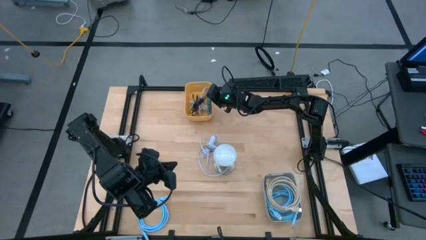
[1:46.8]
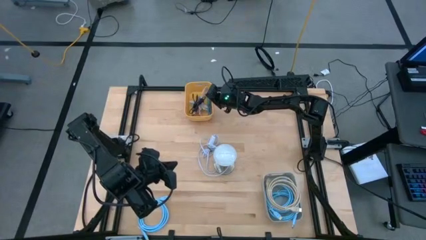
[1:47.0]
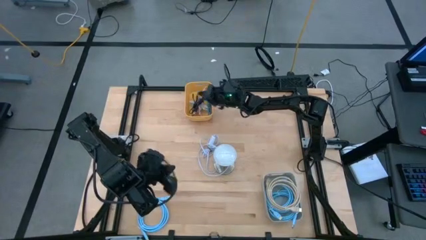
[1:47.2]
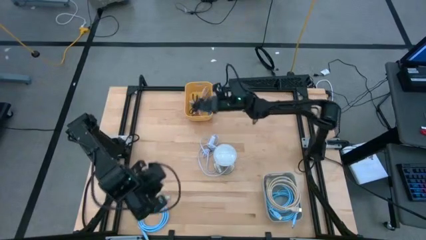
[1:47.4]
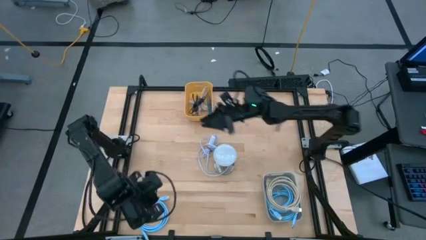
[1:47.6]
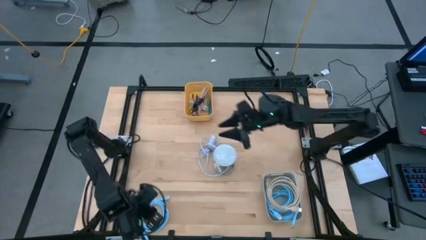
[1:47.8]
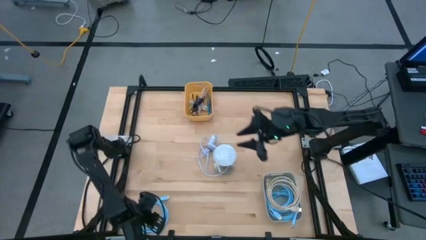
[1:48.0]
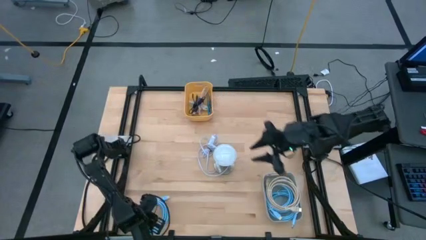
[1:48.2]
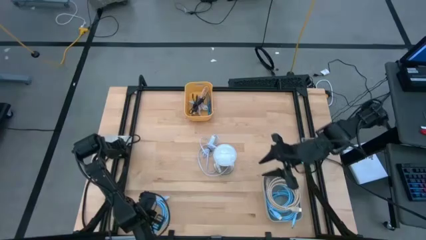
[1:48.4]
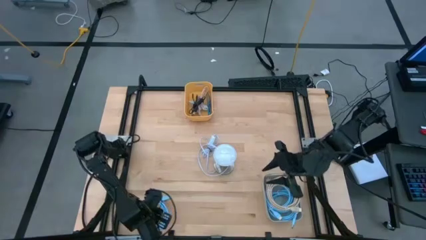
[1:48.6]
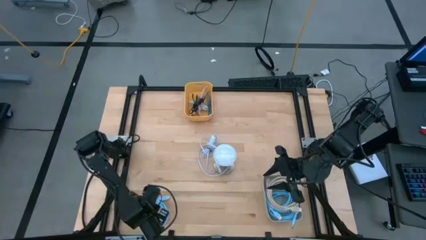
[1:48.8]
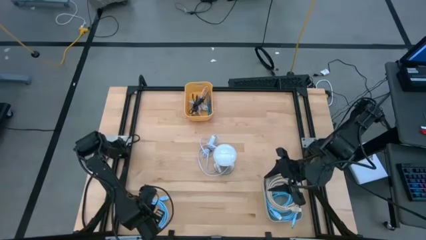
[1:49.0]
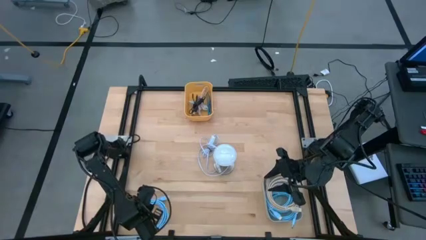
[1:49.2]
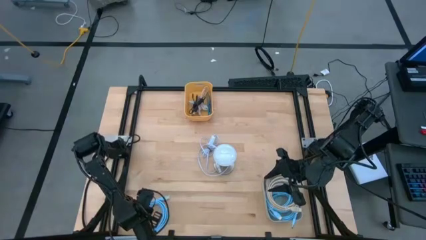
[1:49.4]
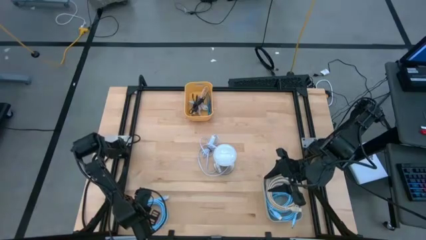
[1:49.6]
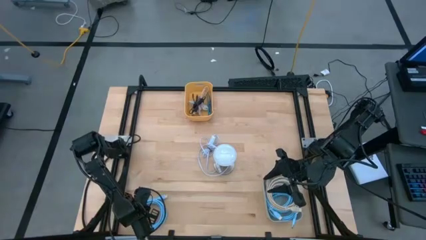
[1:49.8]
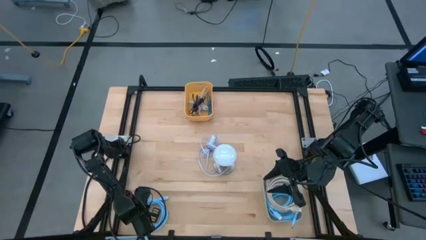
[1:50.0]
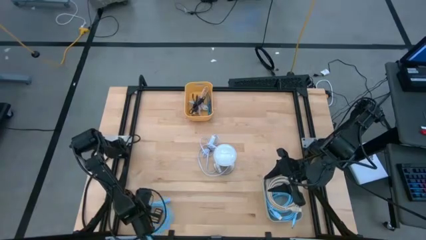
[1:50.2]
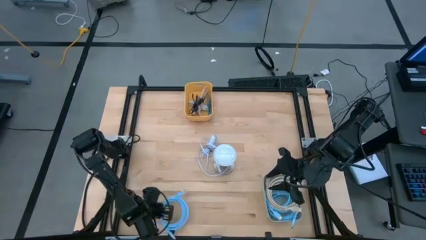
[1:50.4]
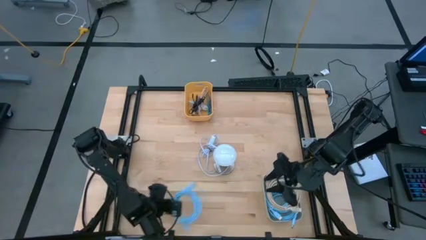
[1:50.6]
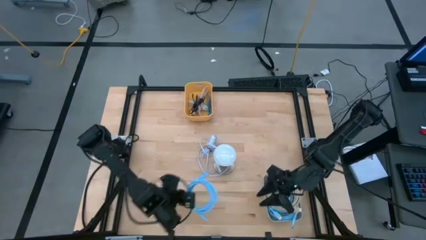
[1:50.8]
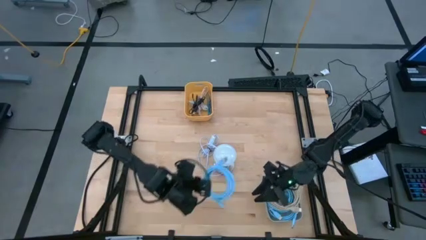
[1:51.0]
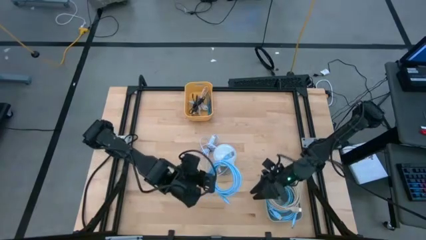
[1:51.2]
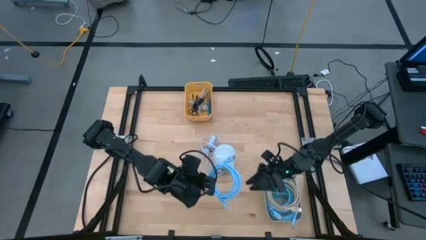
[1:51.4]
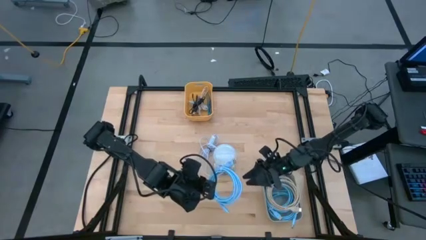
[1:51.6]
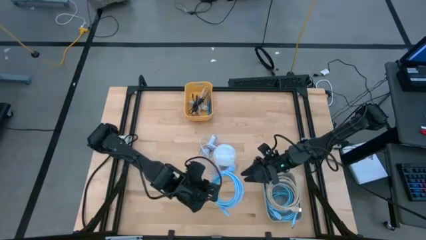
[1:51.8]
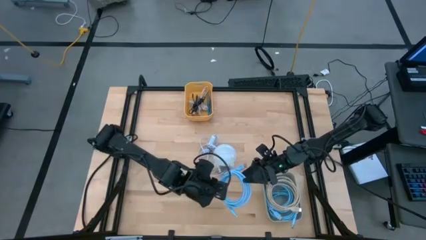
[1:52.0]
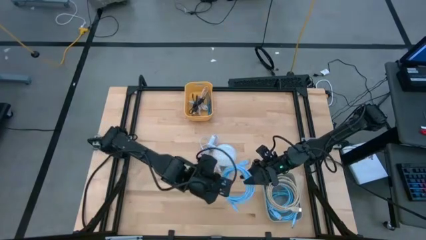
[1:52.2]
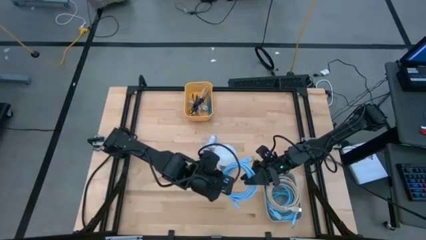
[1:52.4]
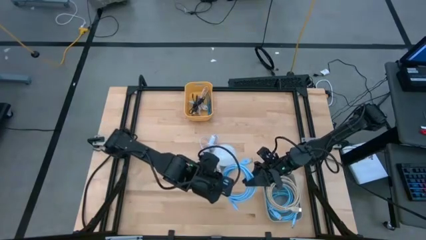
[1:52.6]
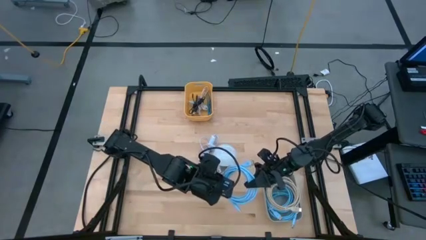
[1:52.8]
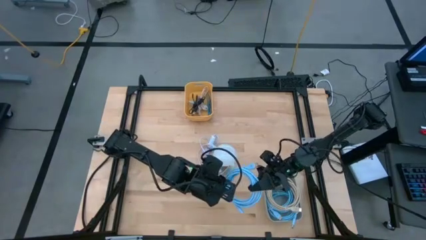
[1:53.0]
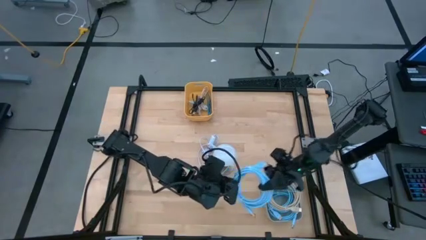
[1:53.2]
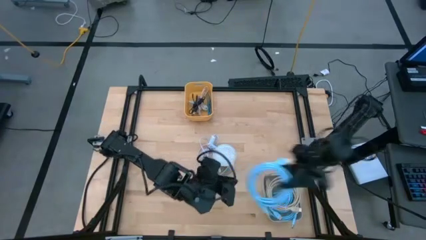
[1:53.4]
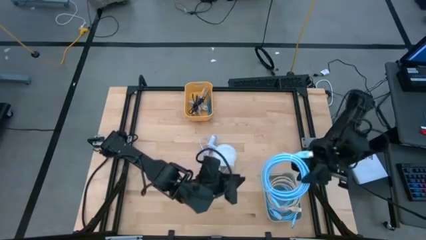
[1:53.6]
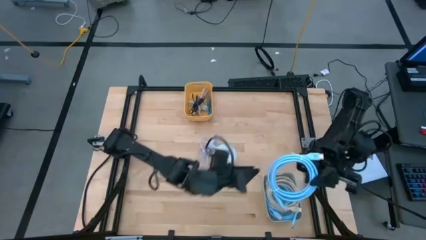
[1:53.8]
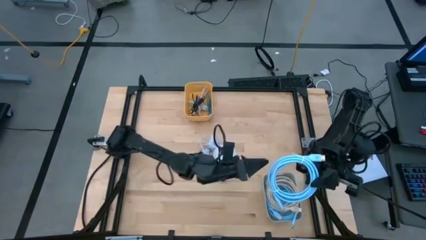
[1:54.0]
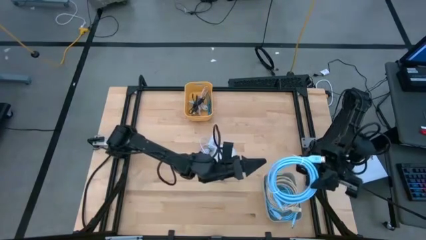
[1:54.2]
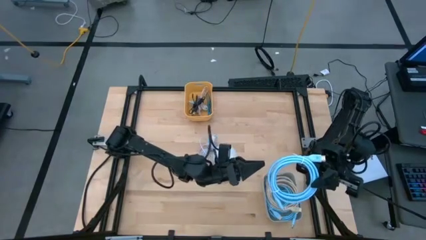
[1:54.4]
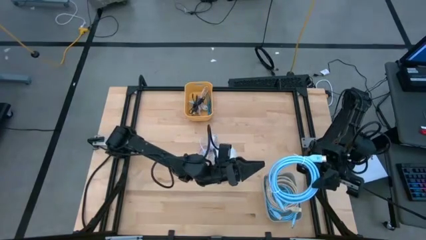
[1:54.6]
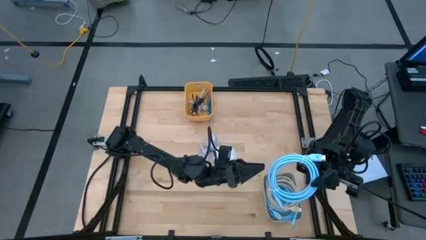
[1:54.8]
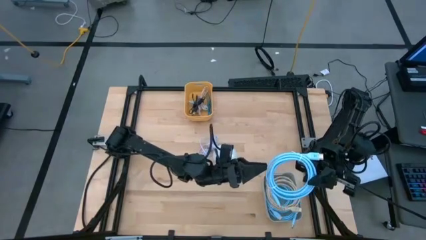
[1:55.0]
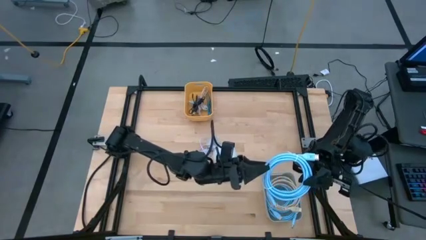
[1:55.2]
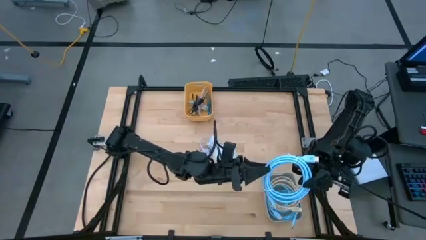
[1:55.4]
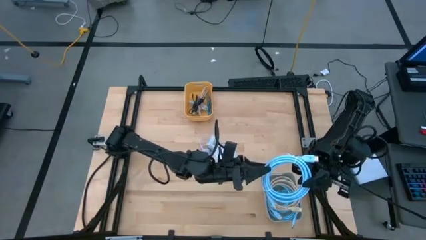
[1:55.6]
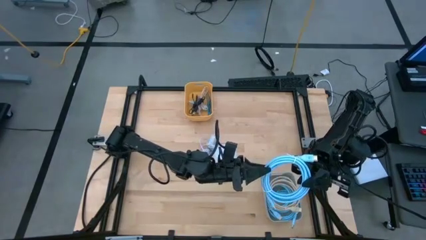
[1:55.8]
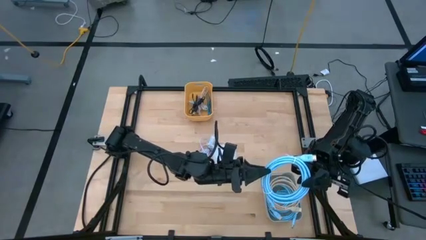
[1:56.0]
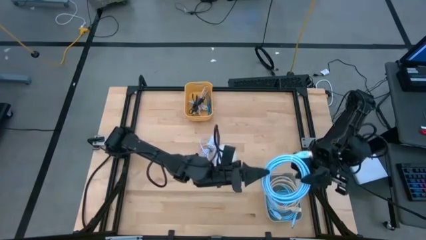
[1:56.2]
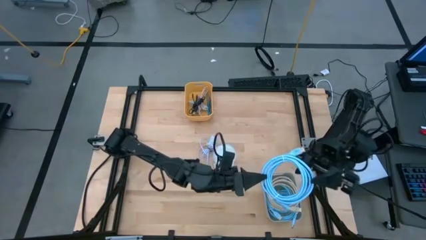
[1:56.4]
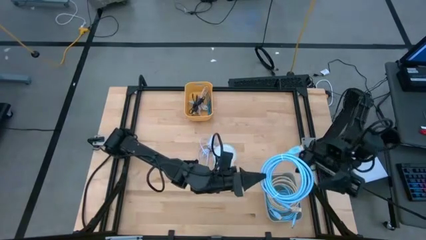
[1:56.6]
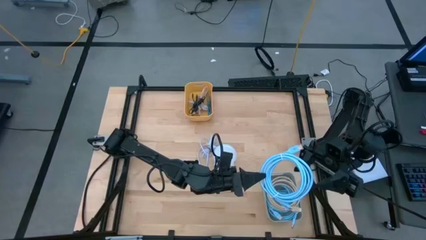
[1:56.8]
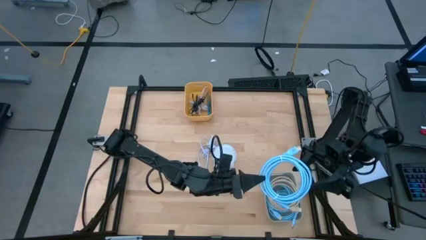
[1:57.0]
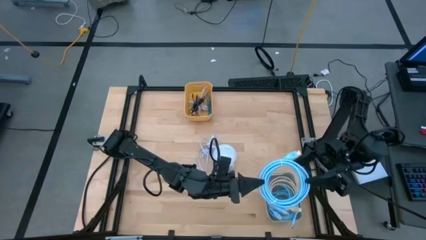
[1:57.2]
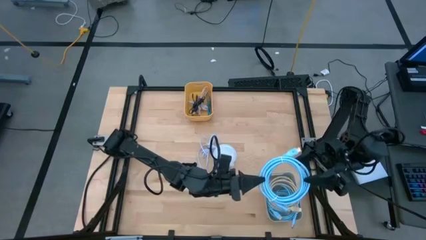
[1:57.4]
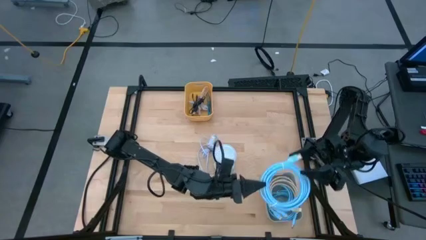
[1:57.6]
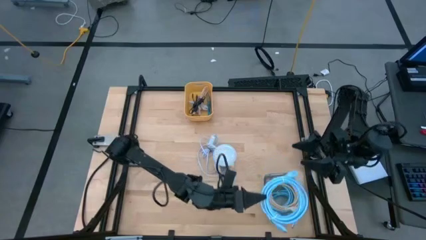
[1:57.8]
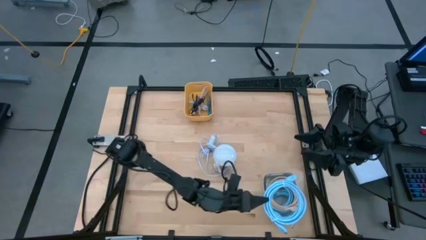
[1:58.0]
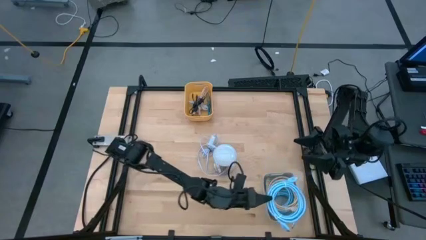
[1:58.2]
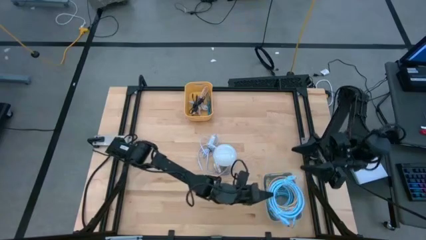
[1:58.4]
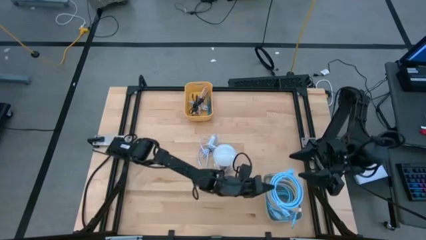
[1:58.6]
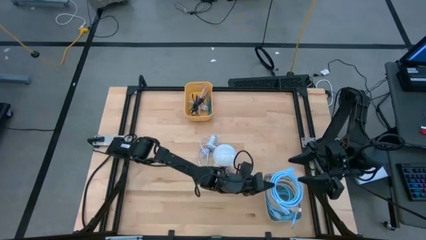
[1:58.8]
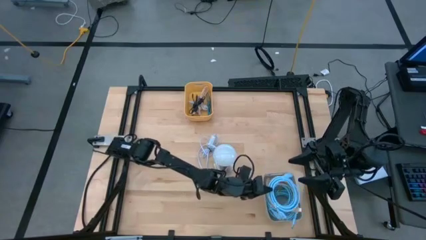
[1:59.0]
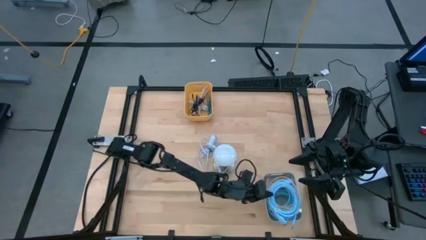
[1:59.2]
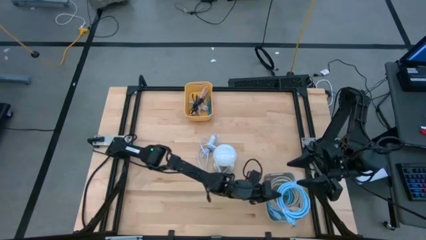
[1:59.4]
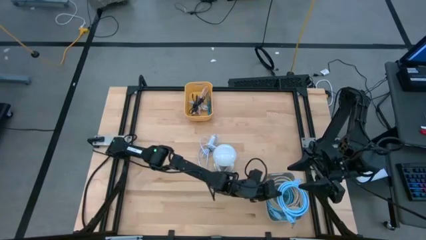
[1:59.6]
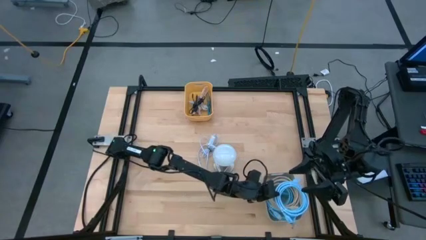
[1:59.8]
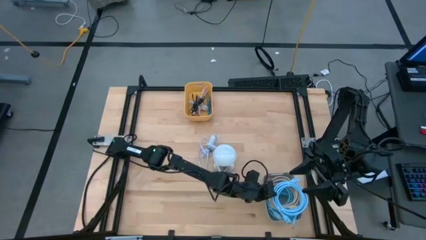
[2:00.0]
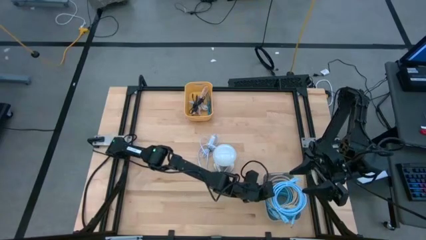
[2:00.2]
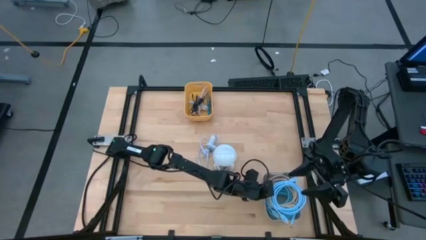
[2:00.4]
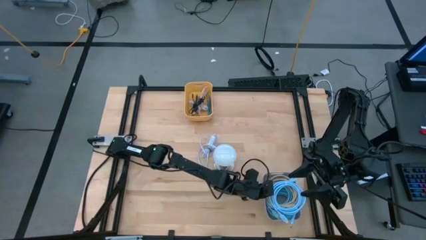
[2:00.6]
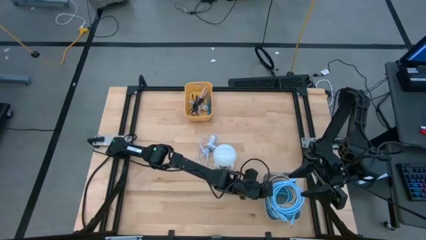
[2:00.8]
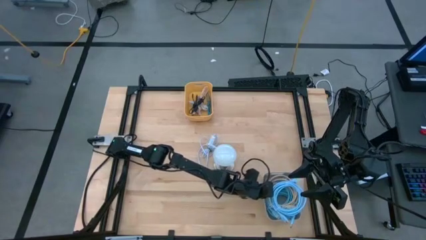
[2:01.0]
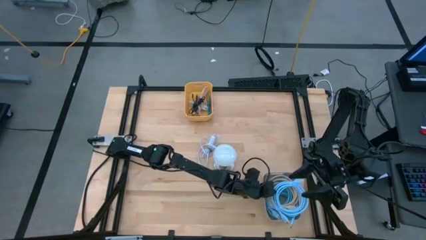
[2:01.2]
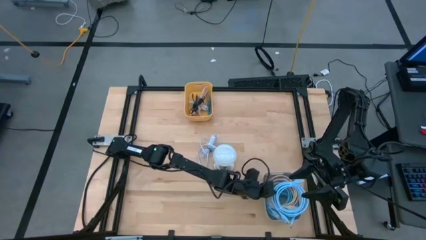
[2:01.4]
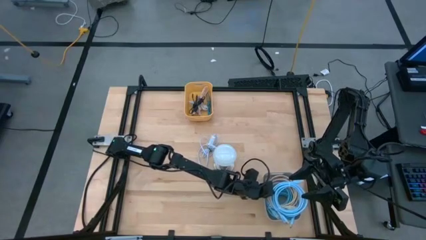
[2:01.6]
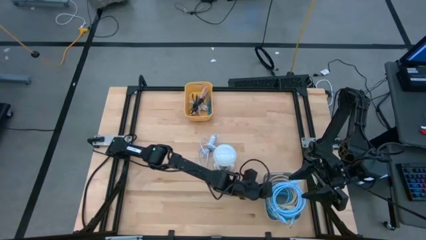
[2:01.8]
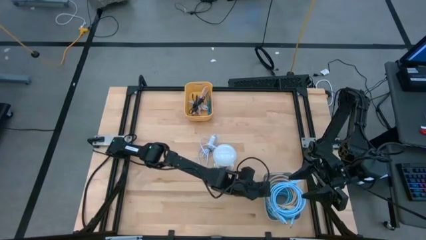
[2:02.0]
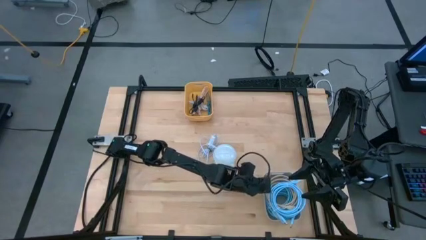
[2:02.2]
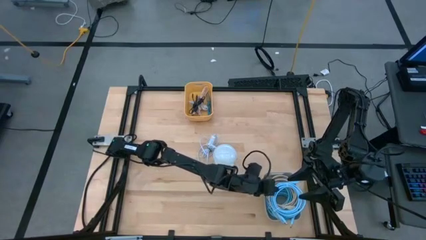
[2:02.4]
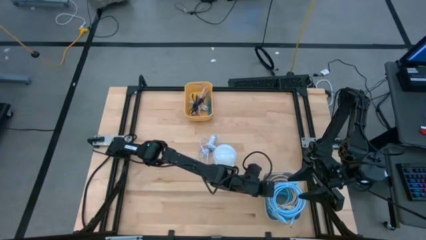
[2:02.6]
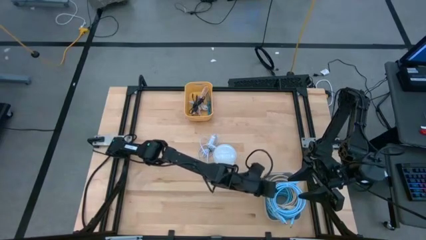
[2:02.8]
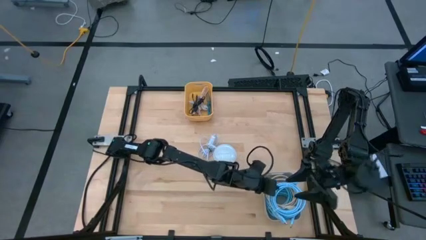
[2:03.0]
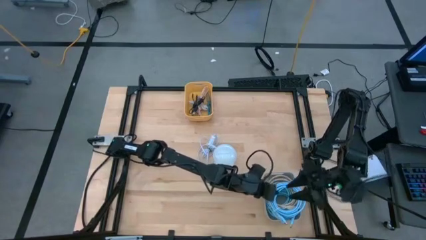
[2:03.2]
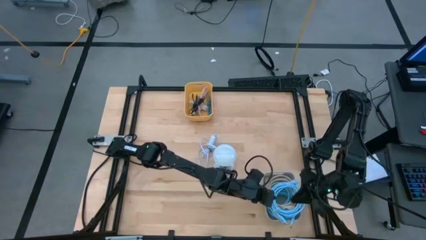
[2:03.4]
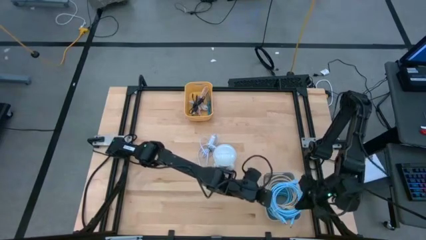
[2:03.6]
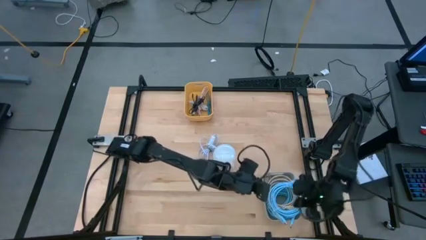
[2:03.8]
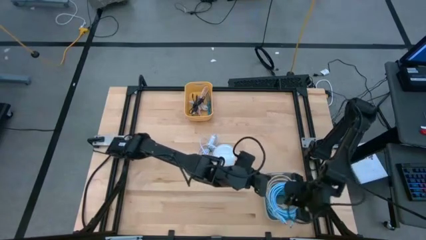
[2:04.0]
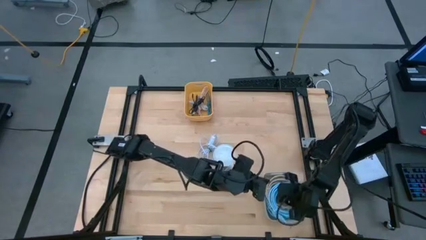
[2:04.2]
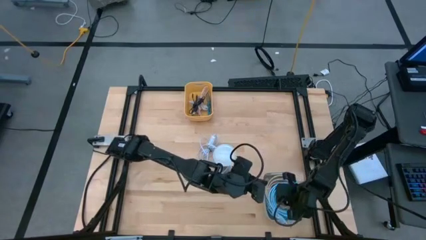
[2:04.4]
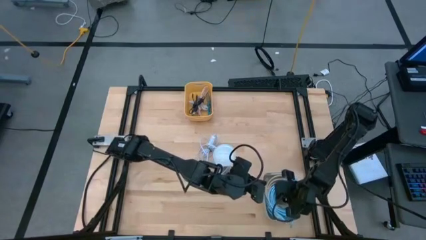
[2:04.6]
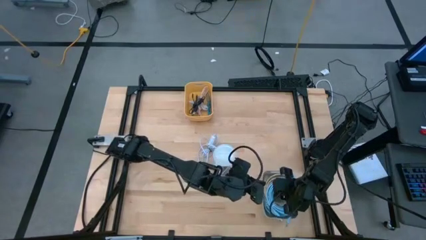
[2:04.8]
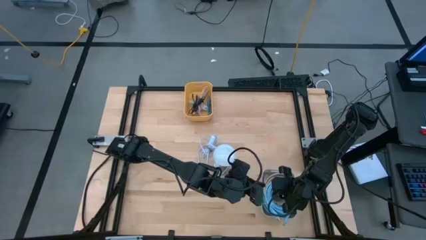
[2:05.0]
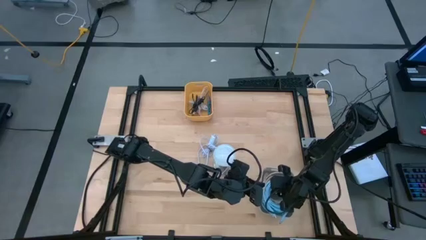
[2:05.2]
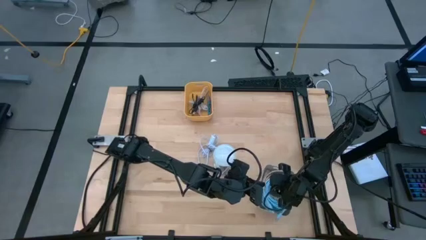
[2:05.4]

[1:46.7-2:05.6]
Task: Pick & Place USB Port
Put the blue HDMI cable into the gray bin
